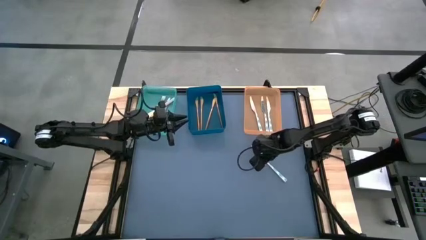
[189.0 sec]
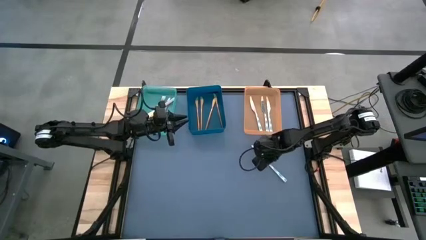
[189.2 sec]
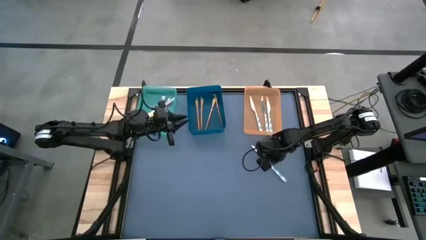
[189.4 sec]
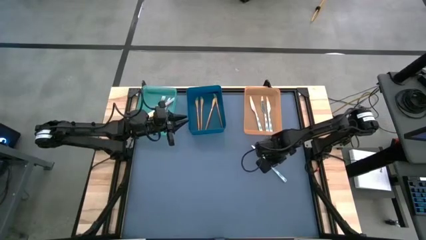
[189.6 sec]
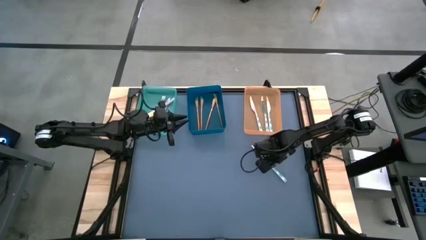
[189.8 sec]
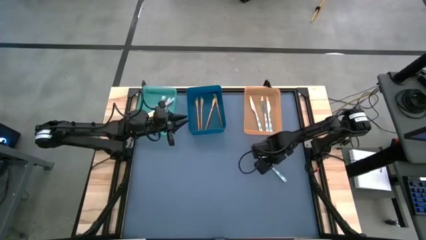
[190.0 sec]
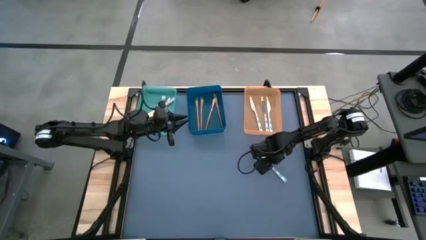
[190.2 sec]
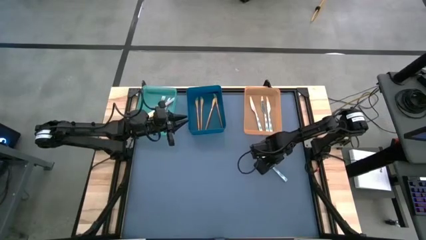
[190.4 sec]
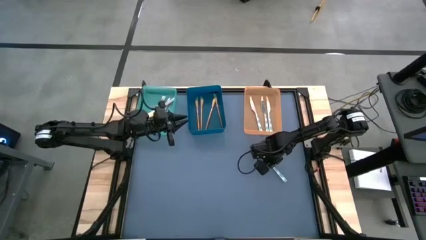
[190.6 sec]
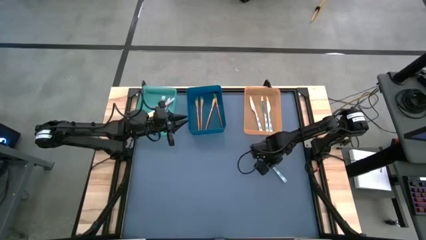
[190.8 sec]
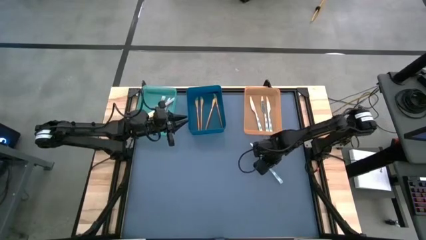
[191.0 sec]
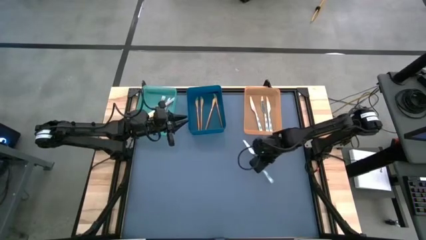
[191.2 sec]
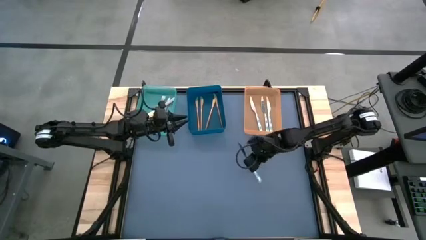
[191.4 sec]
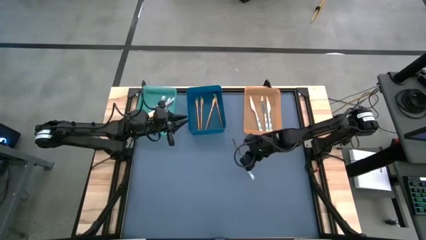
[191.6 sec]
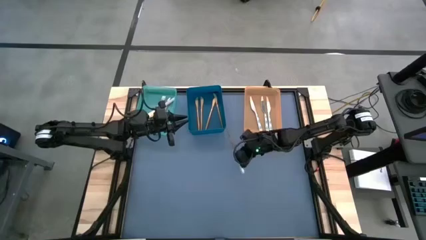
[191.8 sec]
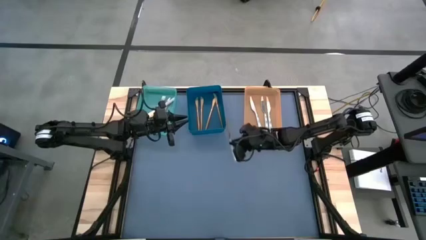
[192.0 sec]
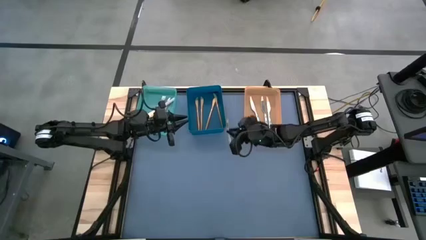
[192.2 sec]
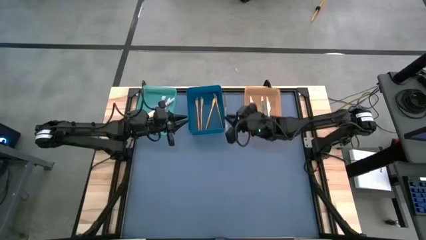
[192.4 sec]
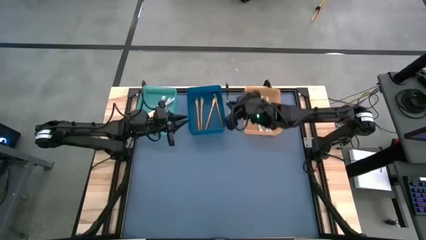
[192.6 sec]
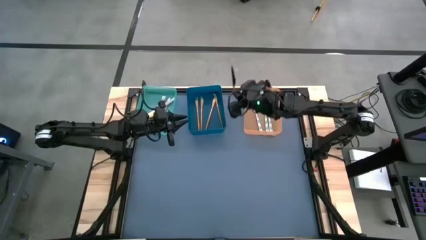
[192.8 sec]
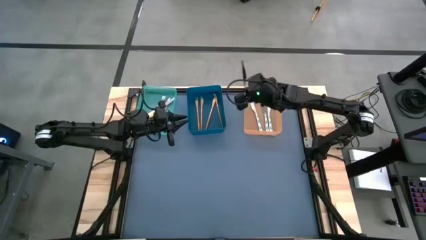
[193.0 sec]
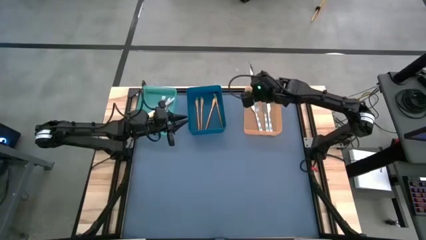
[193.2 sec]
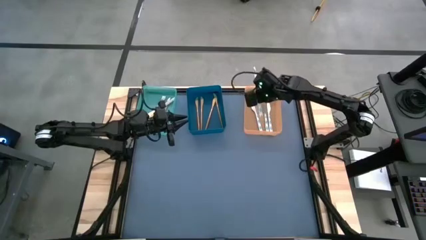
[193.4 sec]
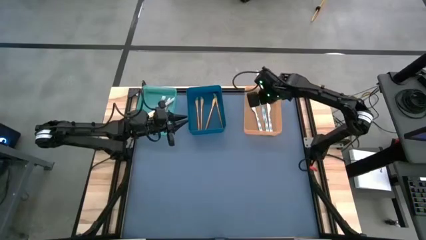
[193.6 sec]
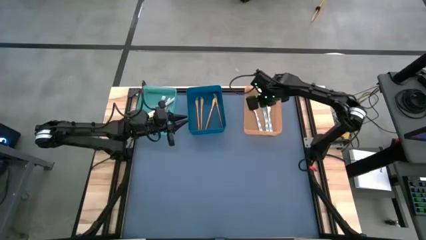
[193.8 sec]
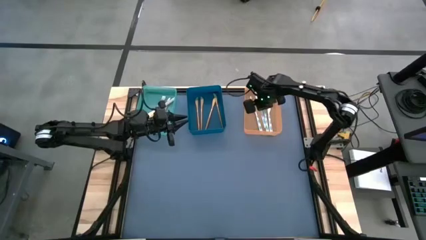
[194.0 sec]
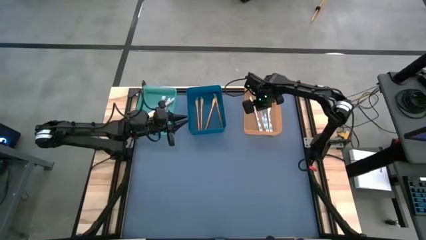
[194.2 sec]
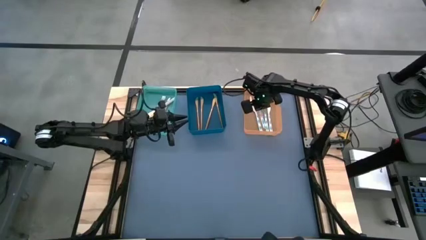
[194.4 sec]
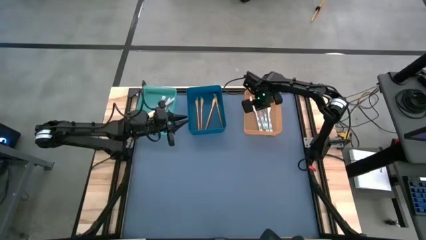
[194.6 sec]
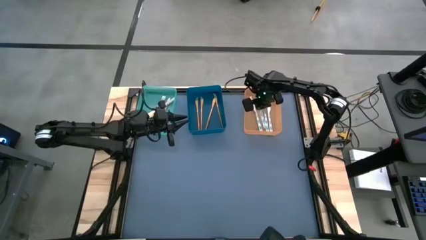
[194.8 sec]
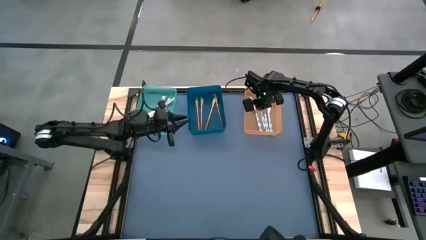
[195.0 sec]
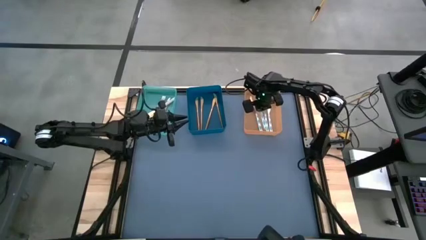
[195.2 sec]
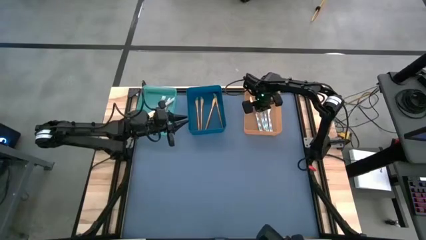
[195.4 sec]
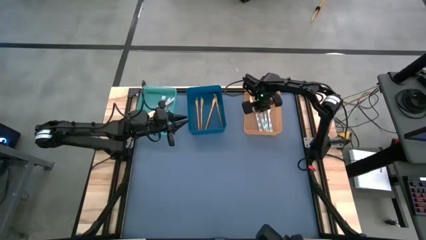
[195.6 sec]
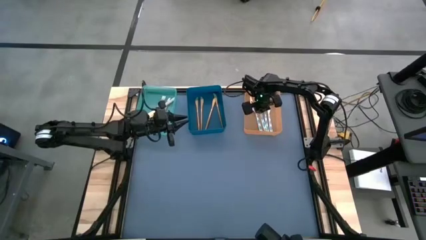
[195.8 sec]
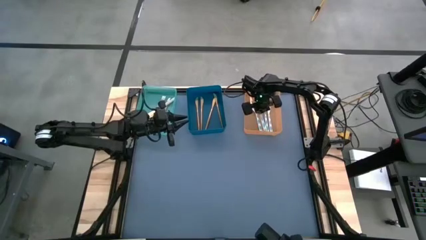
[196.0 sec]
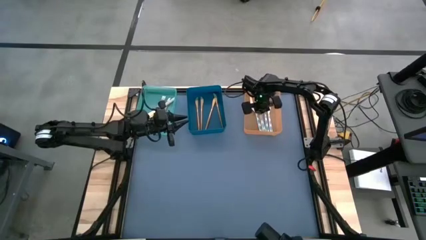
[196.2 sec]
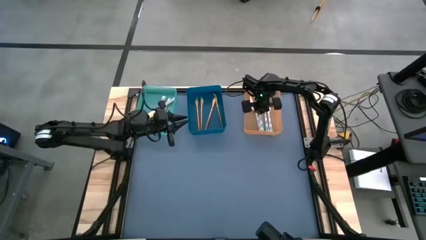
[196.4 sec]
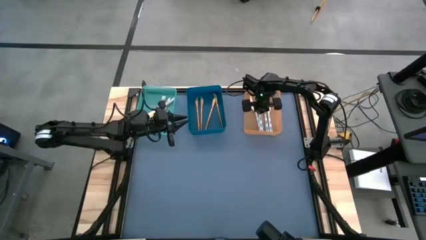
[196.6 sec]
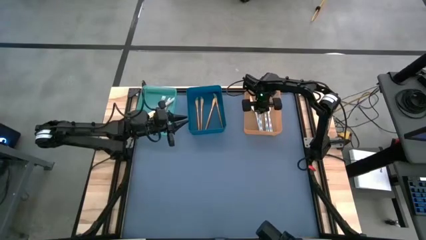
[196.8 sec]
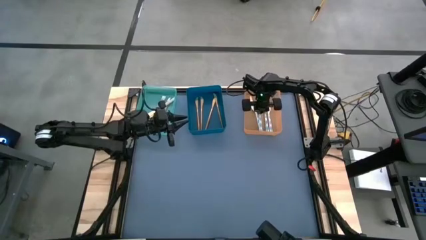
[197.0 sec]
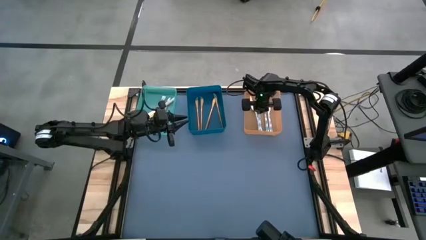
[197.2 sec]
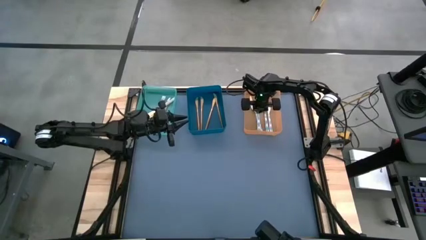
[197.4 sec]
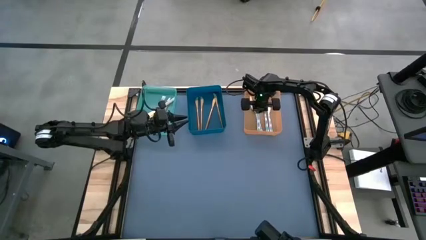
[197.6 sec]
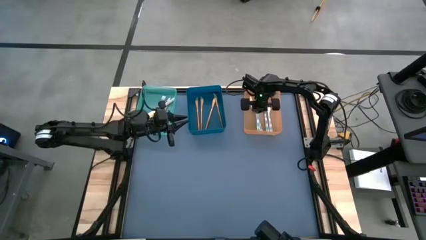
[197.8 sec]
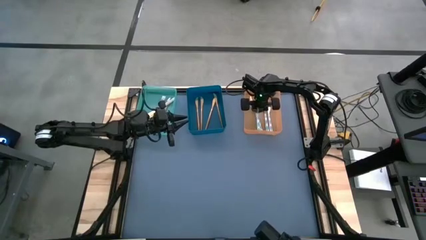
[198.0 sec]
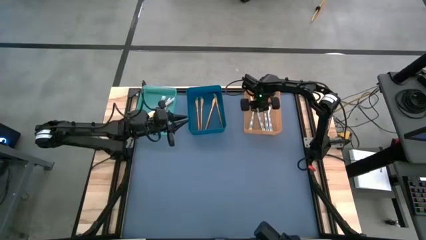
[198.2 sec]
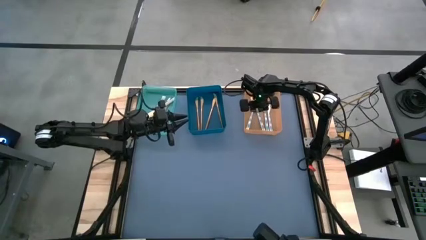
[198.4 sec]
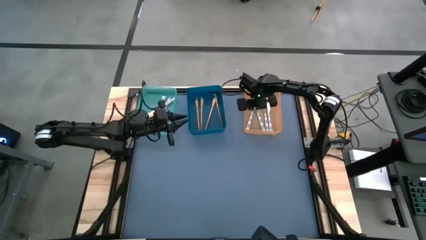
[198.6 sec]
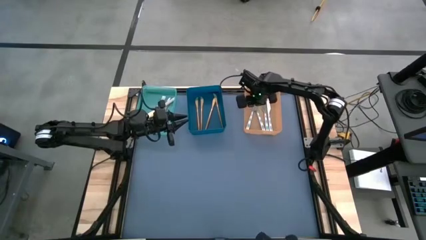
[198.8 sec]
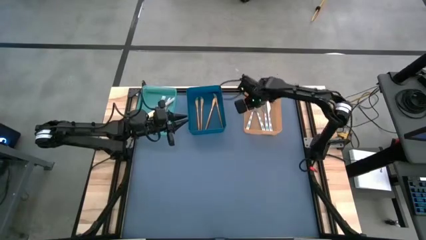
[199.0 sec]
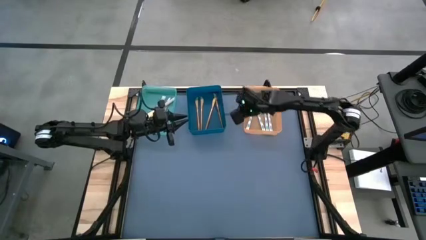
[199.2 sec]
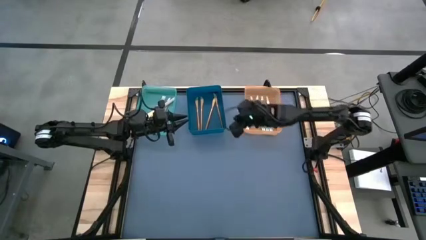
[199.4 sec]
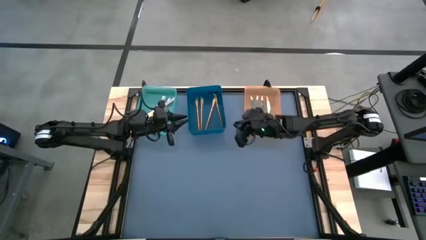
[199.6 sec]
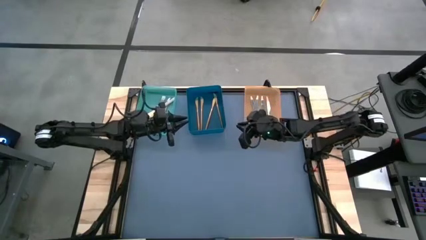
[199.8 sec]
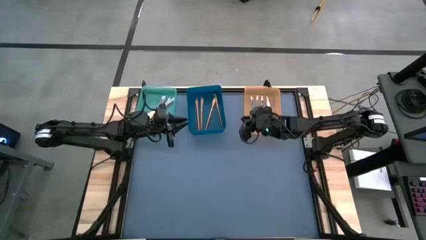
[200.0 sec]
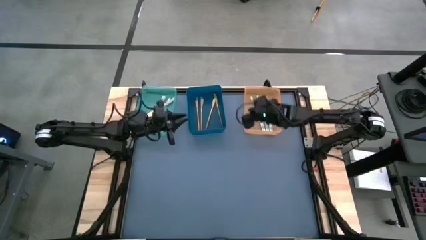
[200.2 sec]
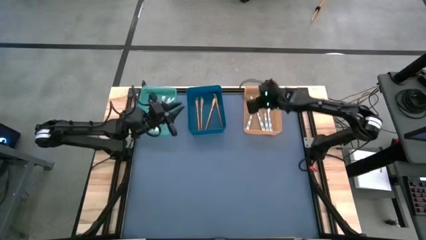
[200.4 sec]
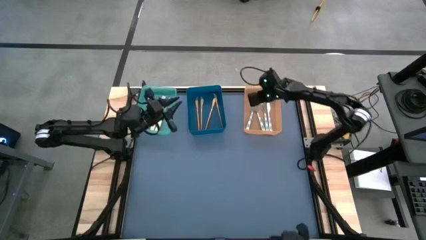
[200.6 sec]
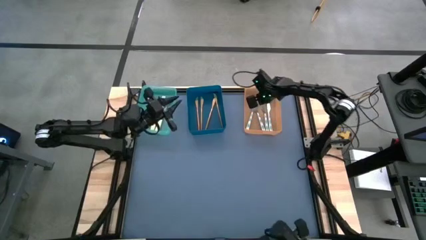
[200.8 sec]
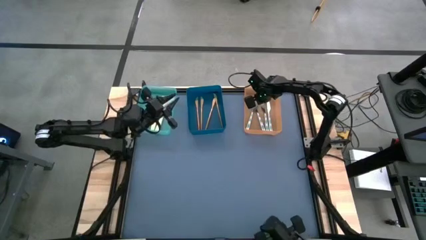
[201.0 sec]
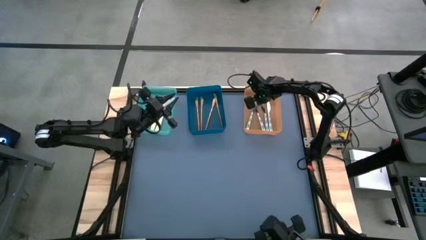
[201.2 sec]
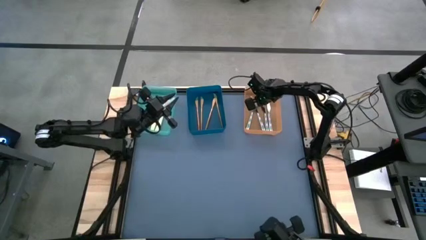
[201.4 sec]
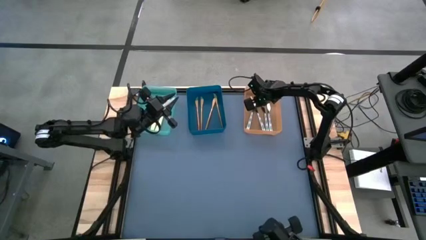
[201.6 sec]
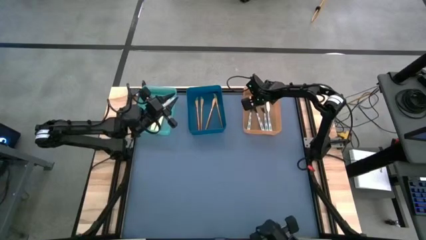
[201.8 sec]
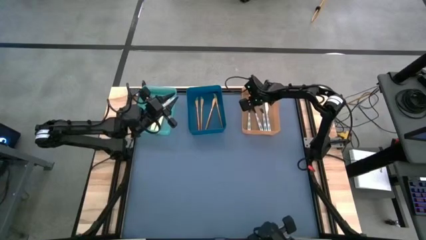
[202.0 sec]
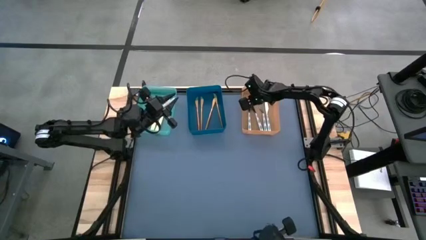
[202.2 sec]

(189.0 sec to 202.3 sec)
Task: Sort silverware by color (type)
Put the white patterned table knife into the orange bin
